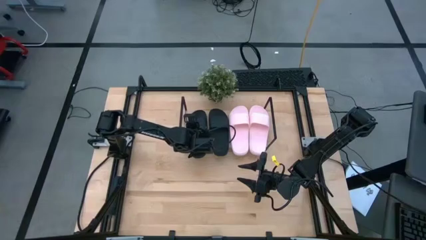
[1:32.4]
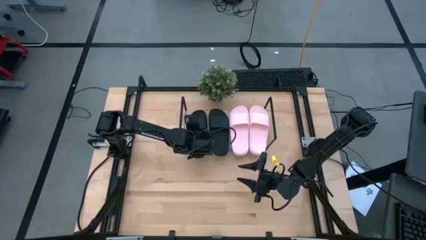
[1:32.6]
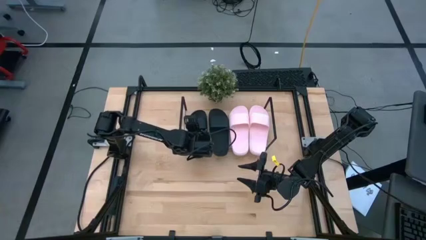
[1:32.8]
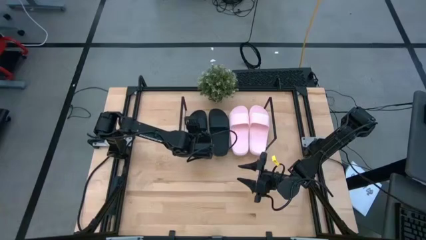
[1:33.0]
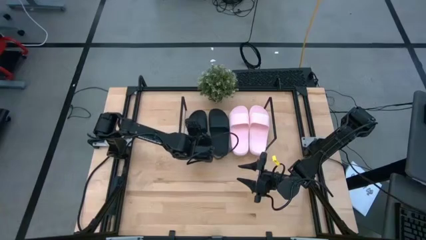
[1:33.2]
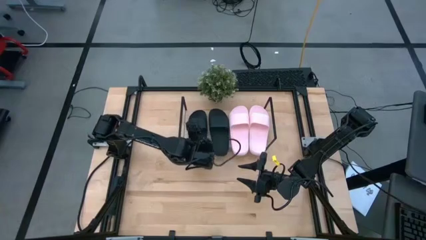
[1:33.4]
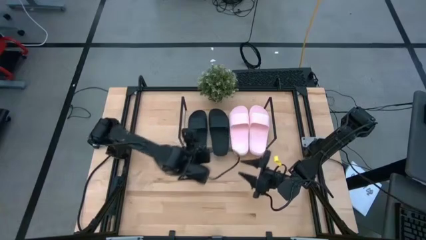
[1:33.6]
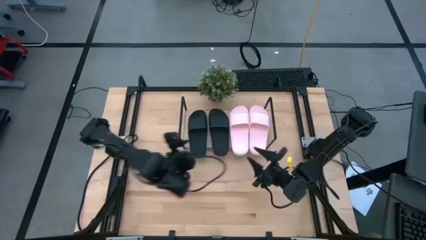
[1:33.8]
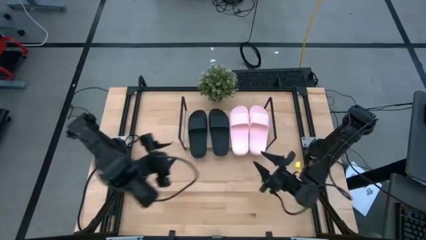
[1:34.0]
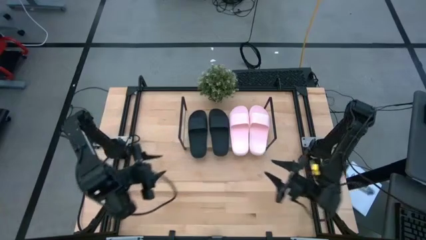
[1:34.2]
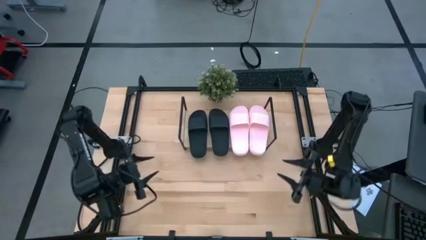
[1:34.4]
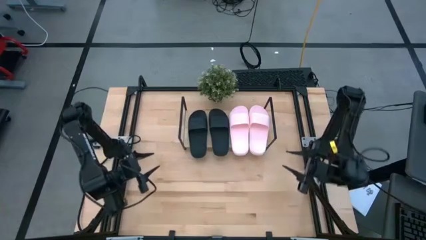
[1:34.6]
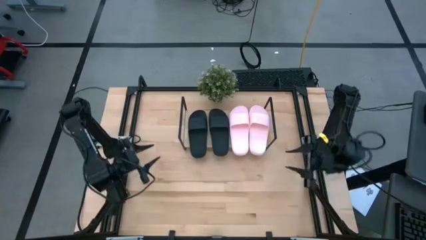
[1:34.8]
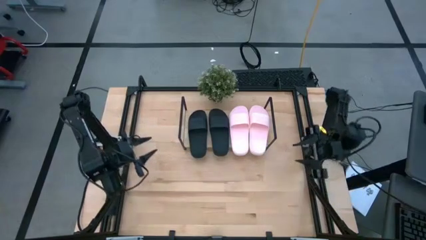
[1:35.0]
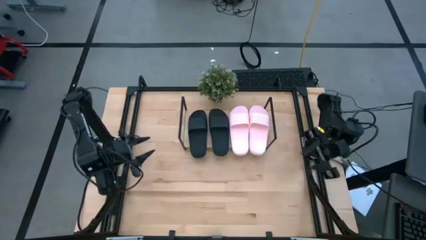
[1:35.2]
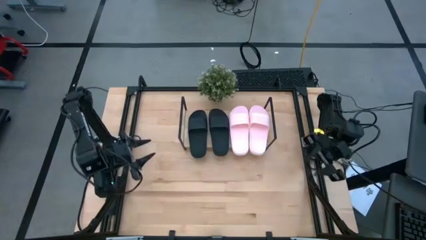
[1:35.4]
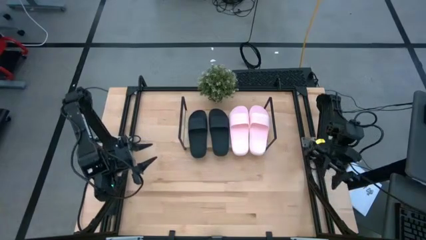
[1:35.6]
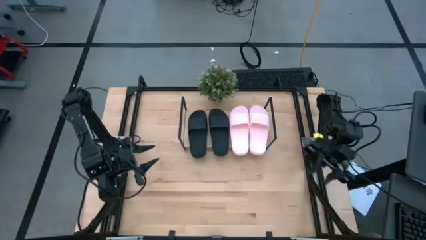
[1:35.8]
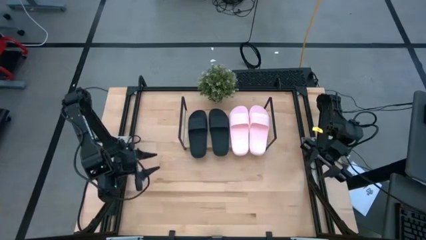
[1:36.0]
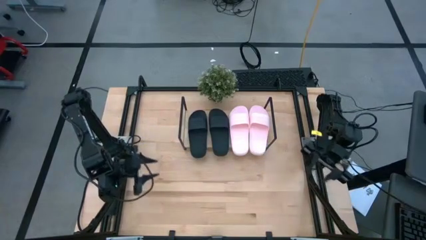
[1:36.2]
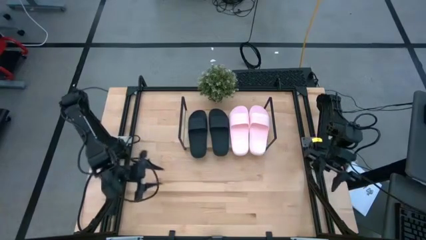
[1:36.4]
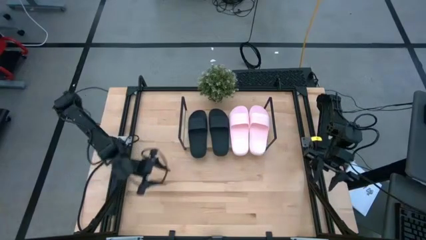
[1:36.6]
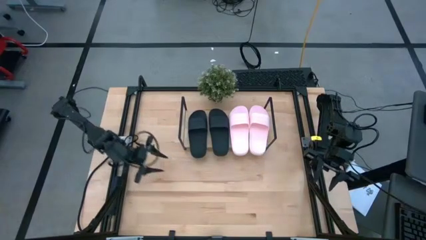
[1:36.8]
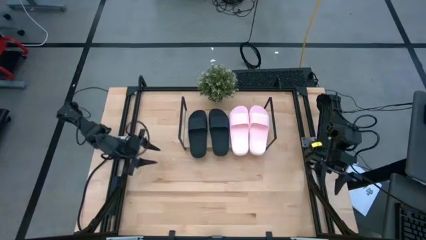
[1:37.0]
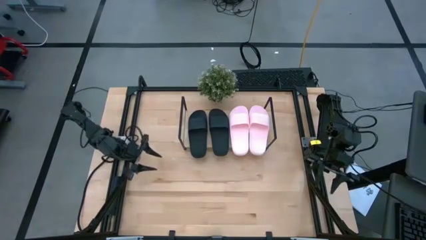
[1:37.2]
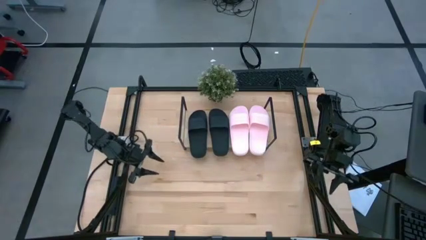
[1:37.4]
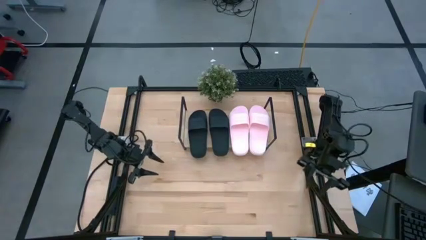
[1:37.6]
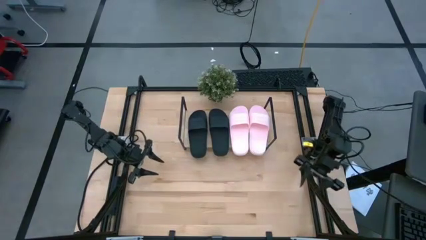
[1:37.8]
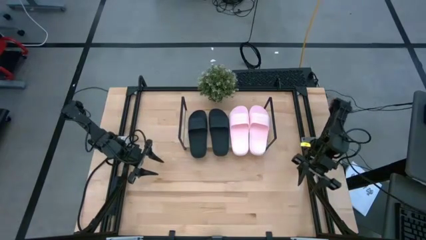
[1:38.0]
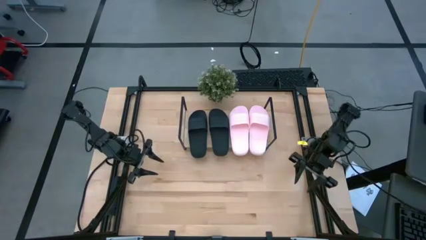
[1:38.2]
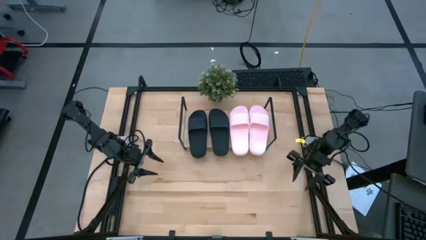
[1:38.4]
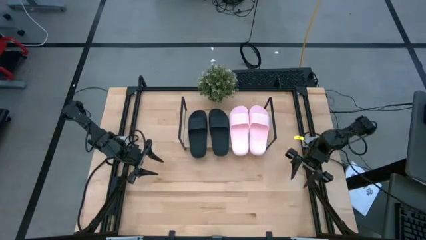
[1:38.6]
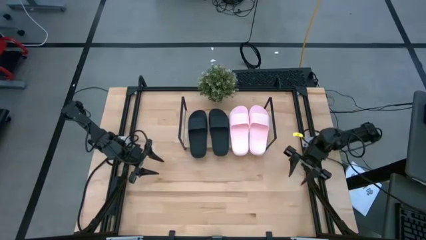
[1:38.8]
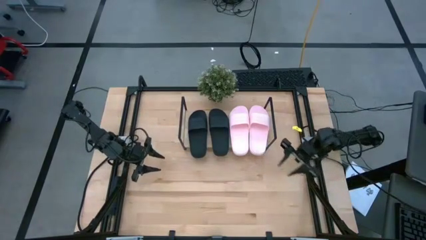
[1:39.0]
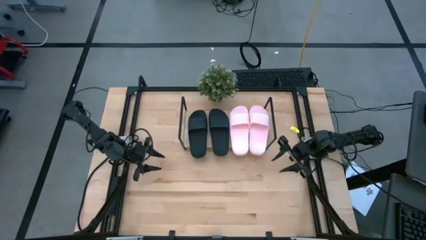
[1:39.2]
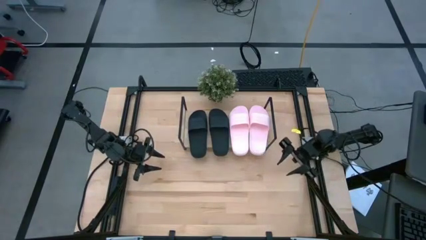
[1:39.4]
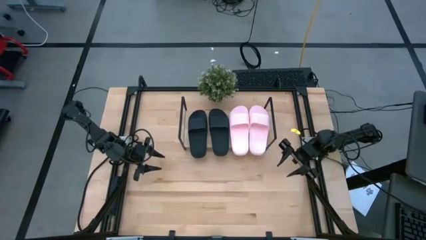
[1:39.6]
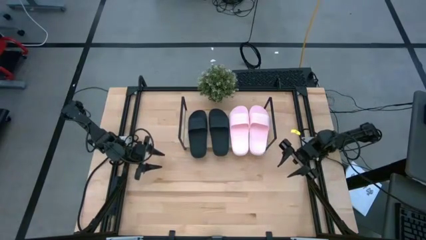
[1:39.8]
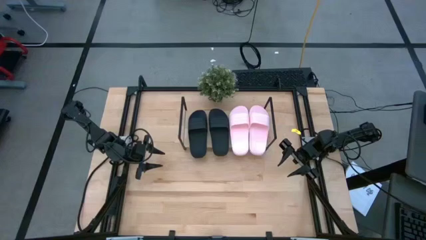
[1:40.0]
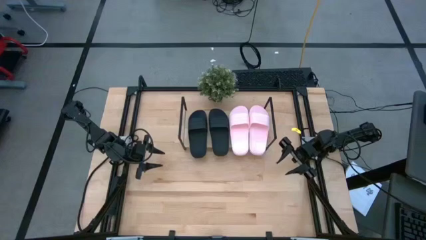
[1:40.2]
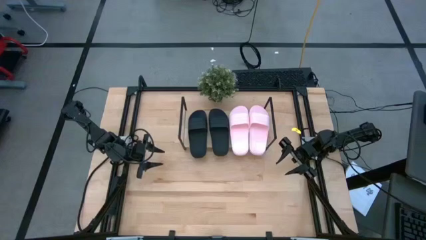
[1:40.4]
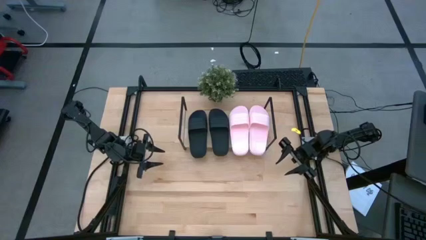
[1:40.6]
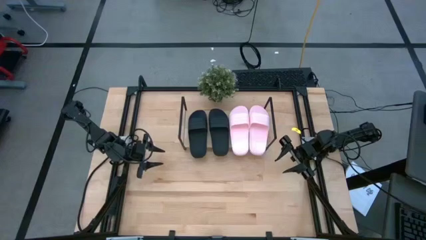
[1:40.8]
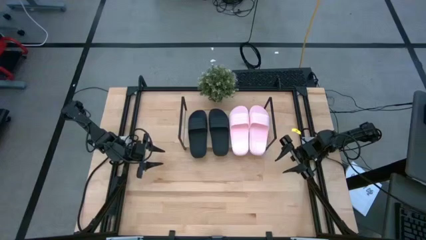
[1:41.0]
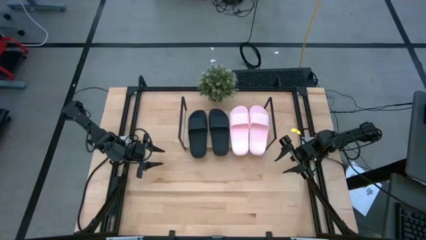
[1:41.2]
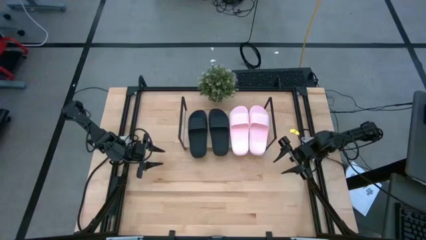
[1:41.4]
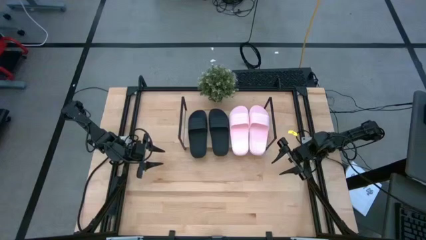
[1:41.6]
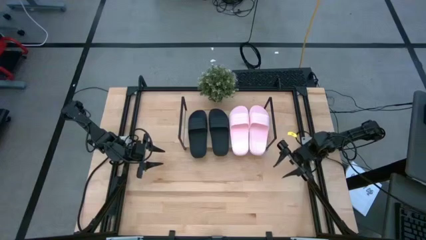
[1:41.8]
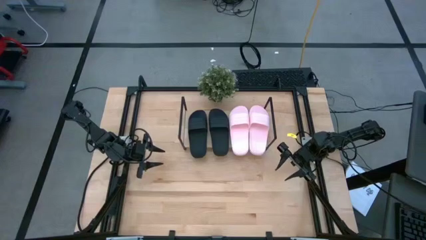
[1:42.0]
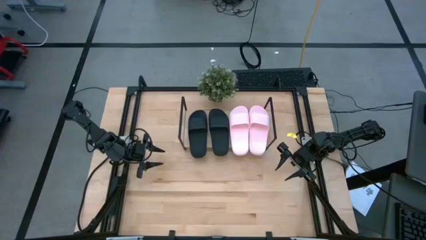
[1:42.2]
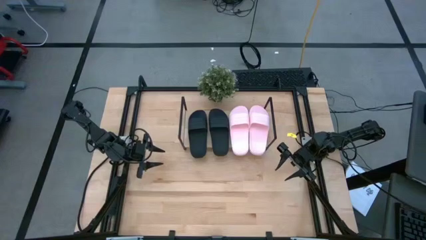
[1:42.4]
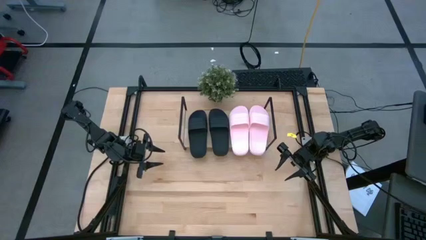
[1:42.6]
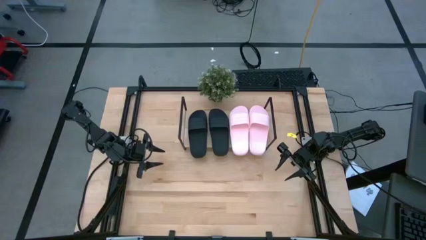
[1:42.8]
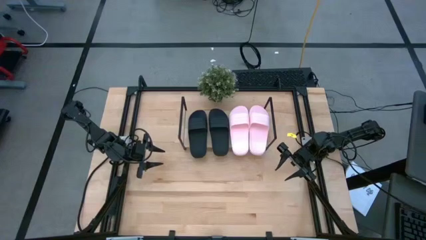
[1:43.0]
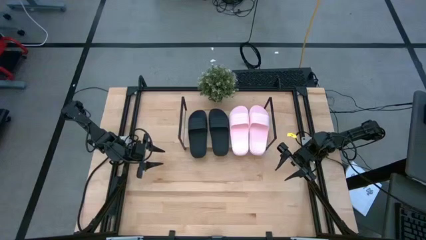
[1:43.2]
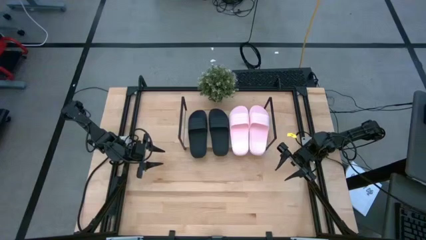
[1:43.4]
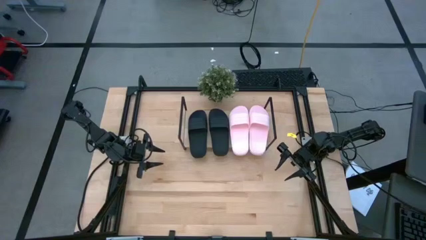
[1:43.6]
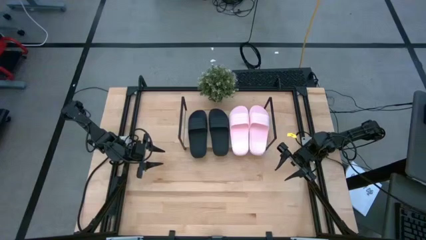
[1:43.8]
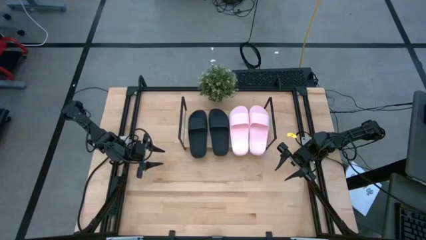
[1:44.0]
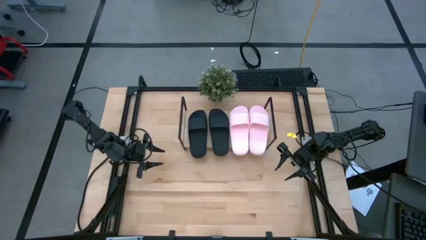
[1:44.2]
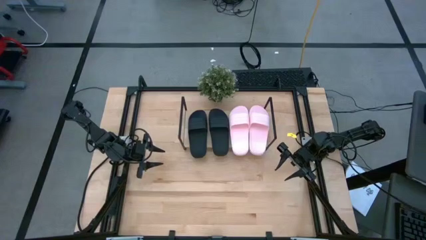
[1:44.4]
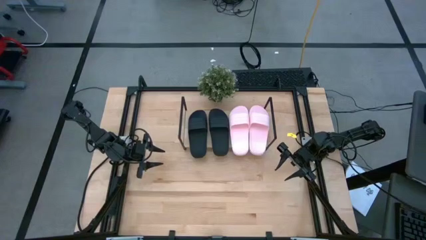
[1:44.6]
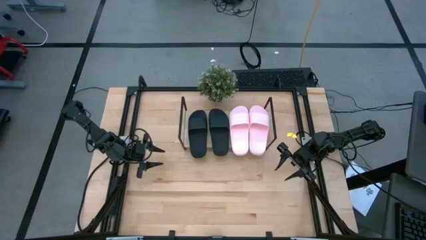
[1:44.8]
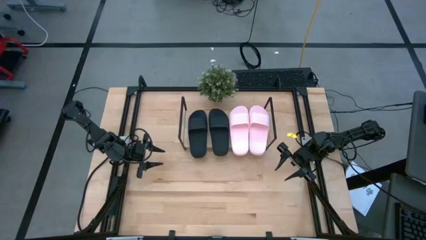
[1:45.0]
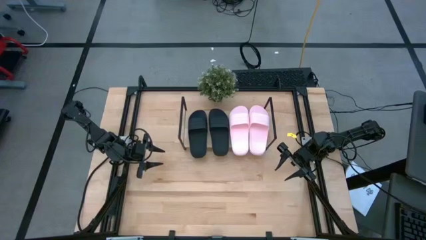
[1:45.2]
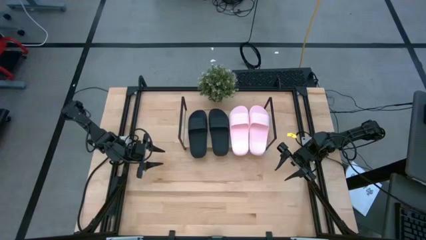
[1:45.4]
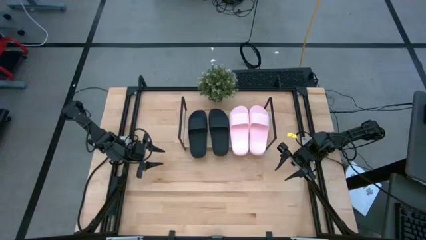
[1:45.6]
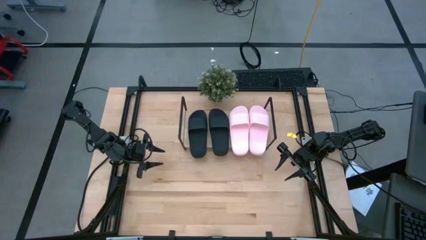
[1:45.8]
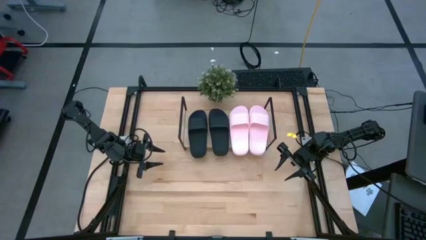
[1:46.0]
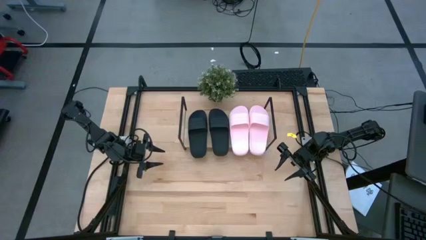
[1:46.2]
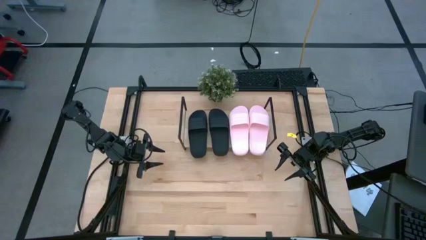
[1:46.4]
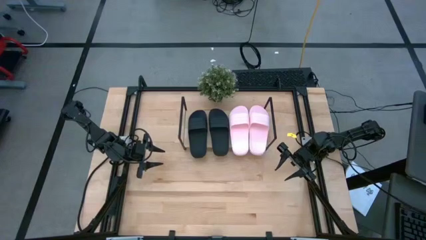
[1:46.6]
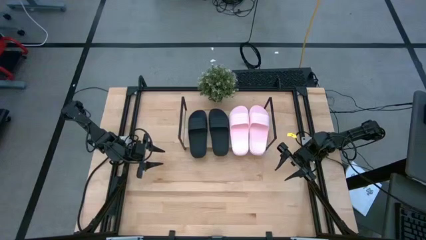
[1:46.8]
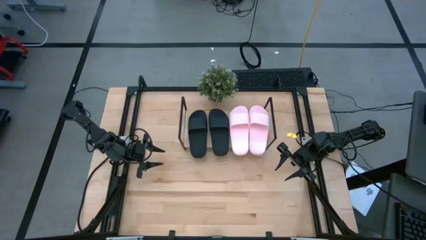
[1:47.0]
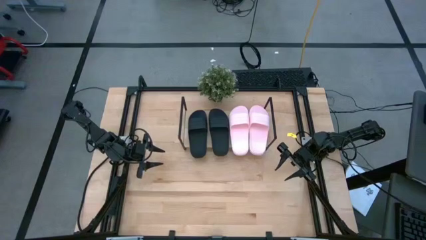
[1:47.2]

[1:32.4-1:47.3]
Task: Pick and place slides into the shelf
Return to Home Position
